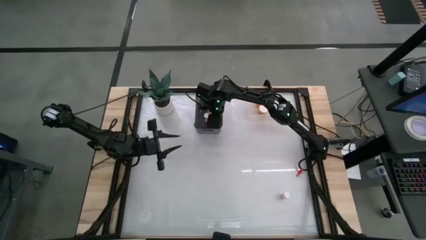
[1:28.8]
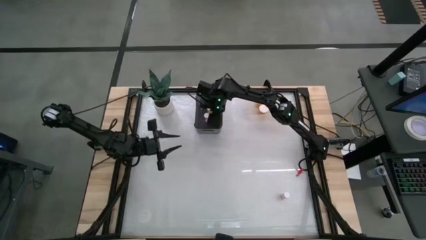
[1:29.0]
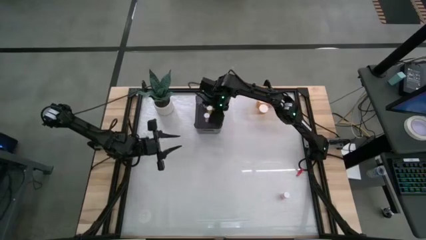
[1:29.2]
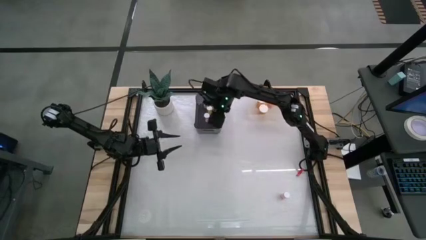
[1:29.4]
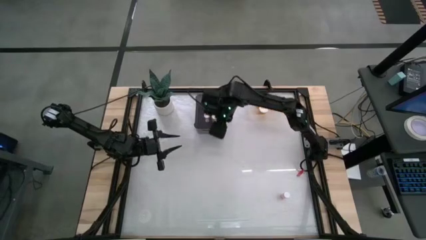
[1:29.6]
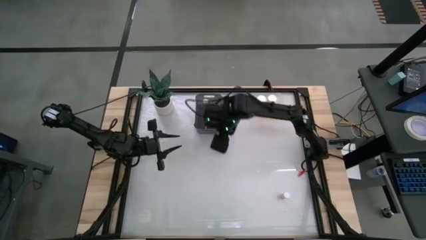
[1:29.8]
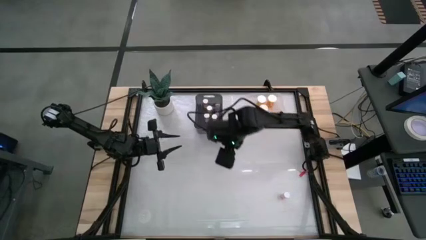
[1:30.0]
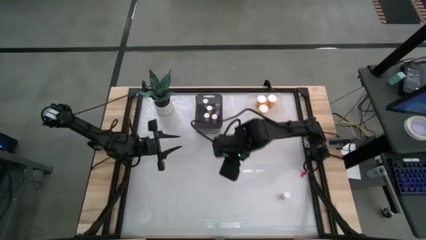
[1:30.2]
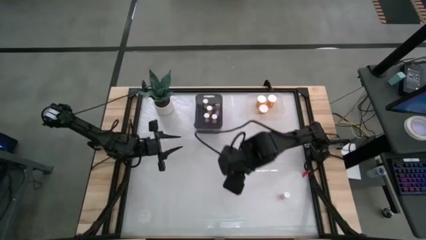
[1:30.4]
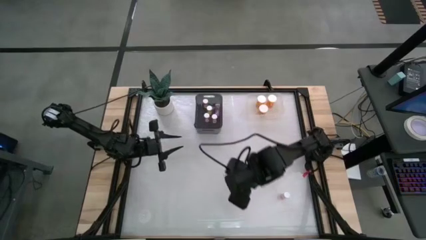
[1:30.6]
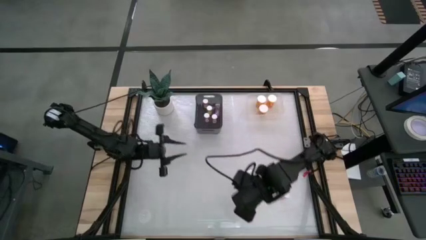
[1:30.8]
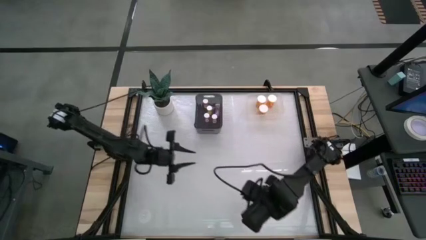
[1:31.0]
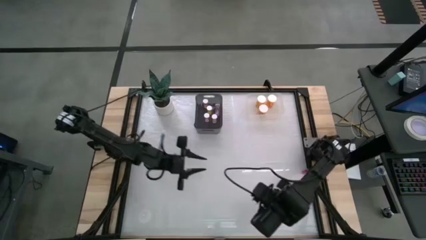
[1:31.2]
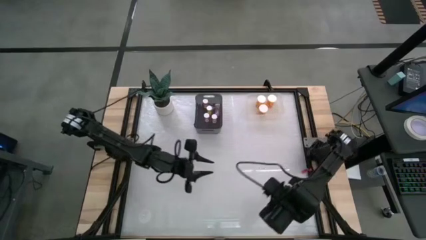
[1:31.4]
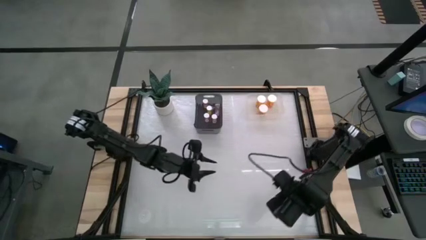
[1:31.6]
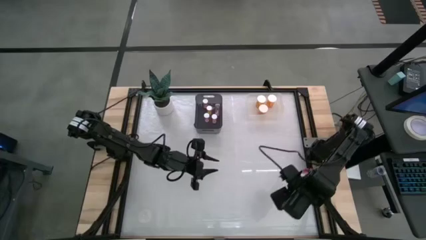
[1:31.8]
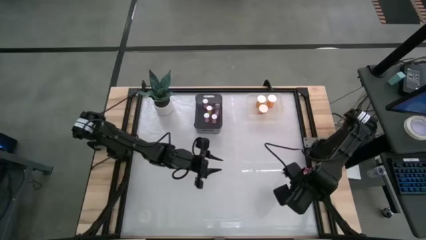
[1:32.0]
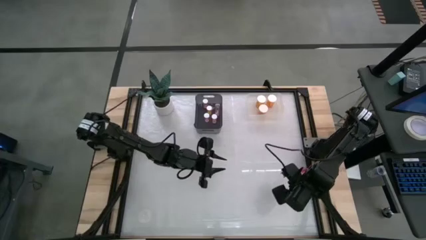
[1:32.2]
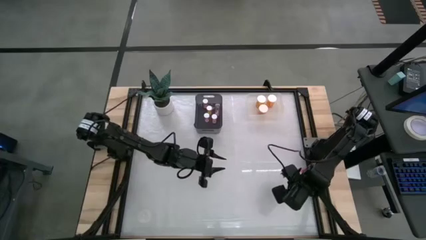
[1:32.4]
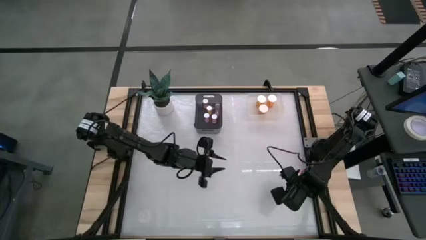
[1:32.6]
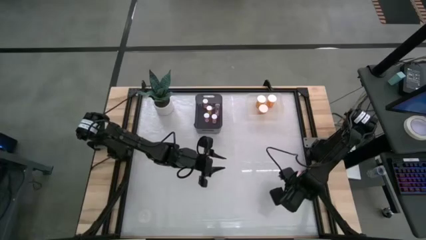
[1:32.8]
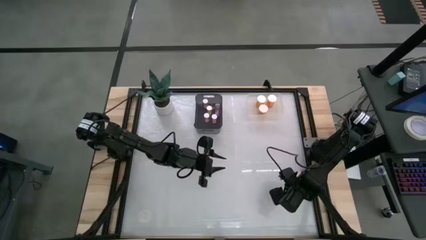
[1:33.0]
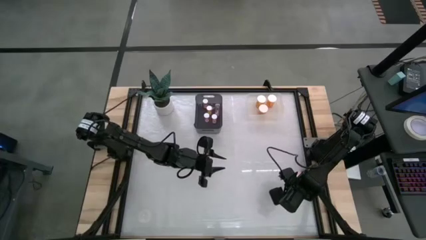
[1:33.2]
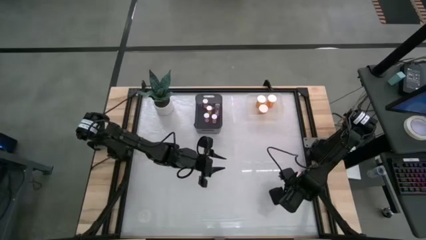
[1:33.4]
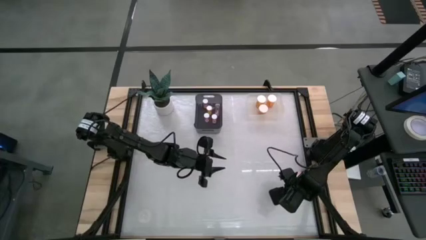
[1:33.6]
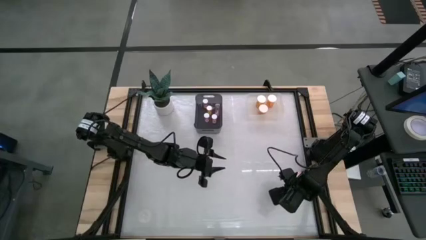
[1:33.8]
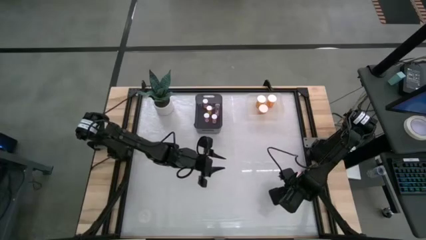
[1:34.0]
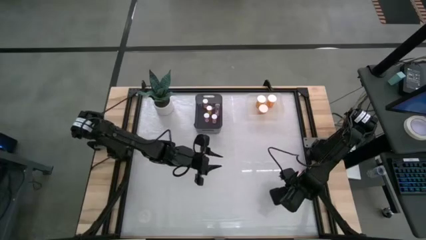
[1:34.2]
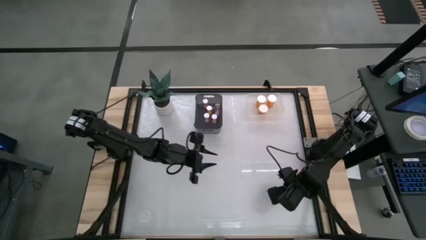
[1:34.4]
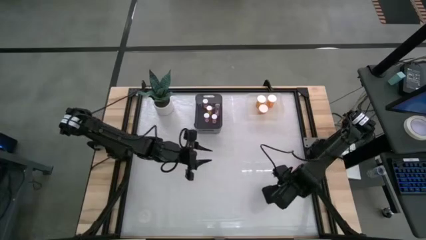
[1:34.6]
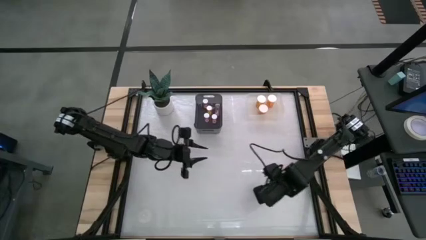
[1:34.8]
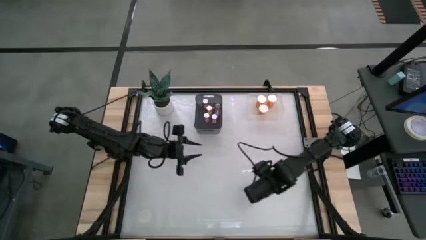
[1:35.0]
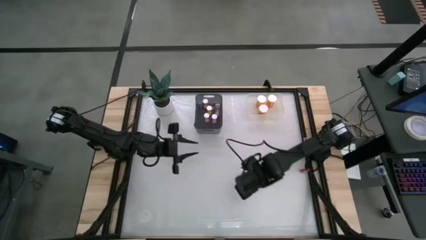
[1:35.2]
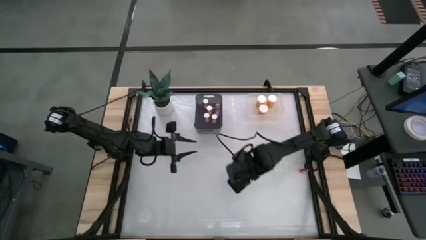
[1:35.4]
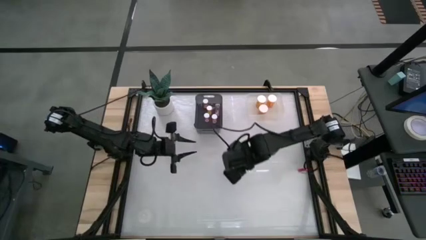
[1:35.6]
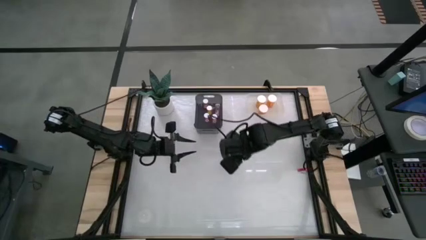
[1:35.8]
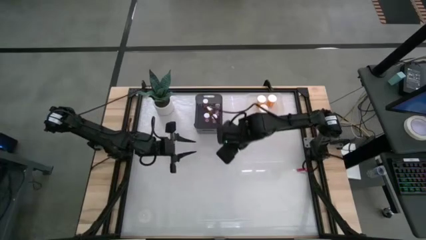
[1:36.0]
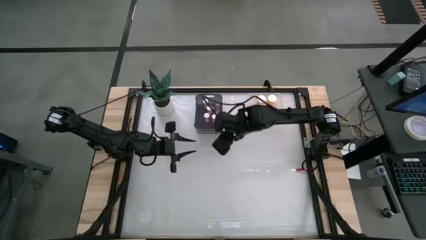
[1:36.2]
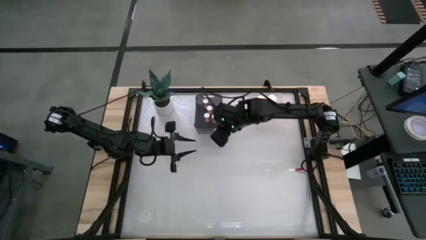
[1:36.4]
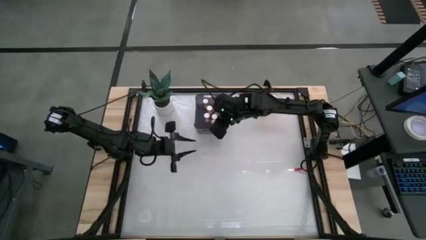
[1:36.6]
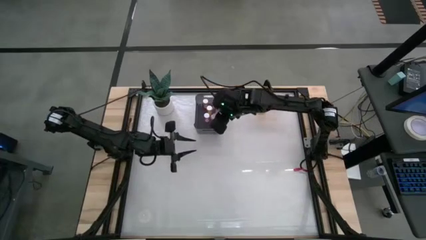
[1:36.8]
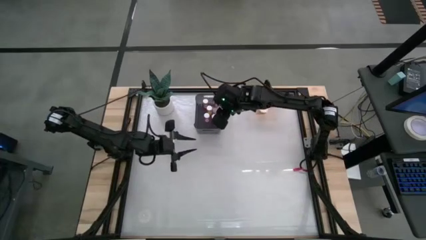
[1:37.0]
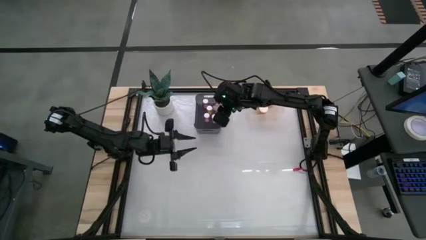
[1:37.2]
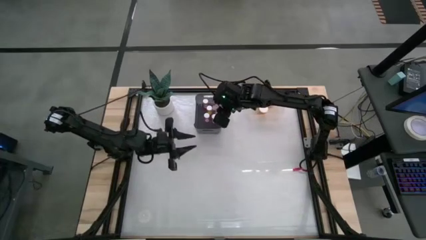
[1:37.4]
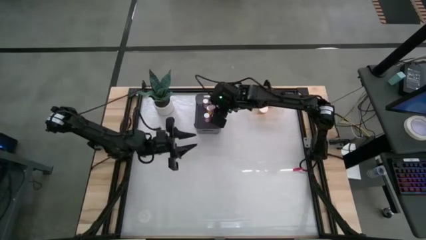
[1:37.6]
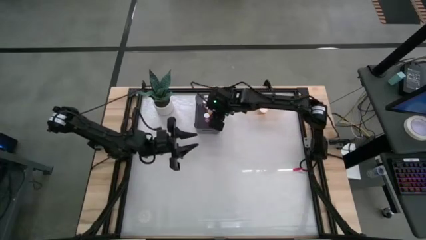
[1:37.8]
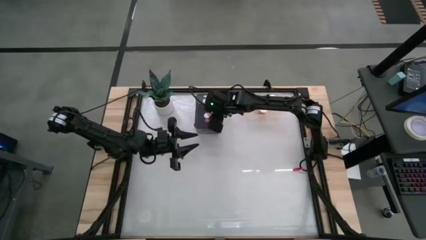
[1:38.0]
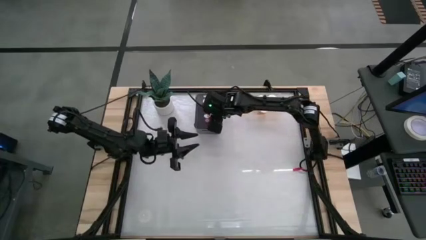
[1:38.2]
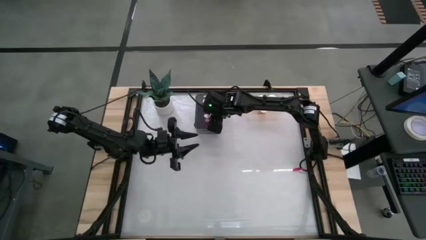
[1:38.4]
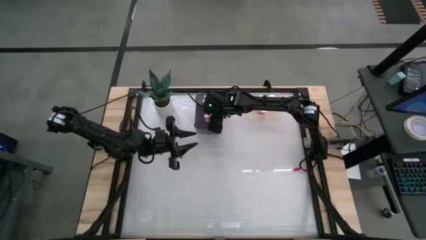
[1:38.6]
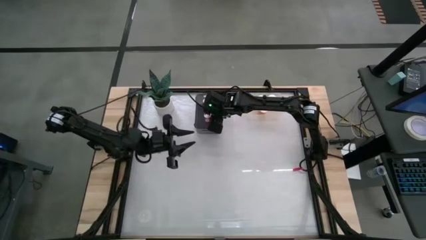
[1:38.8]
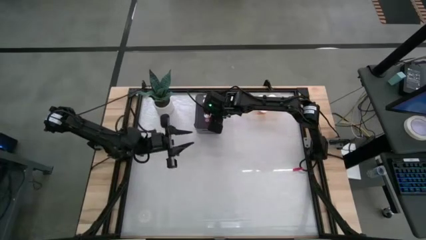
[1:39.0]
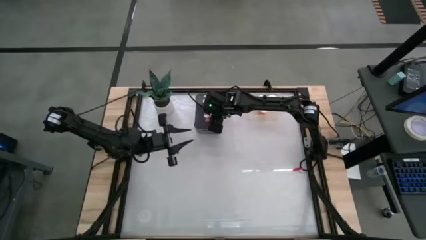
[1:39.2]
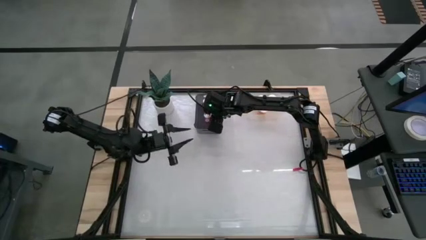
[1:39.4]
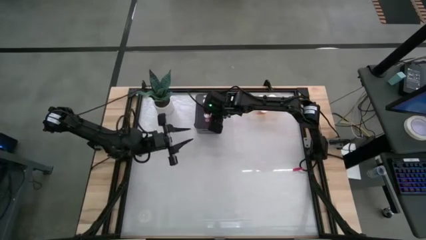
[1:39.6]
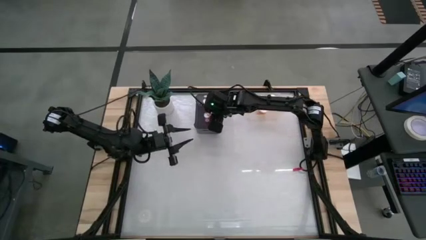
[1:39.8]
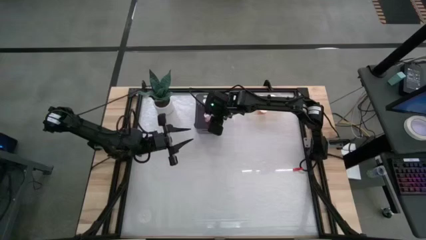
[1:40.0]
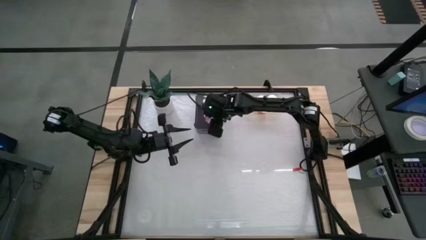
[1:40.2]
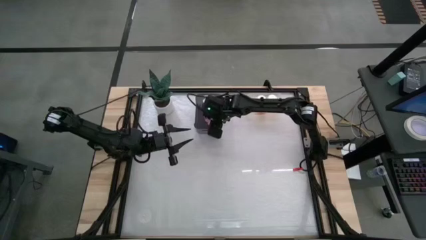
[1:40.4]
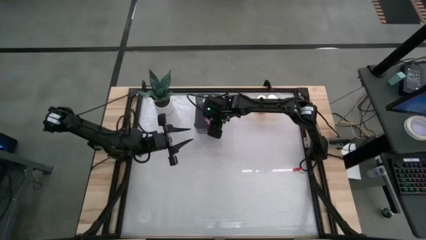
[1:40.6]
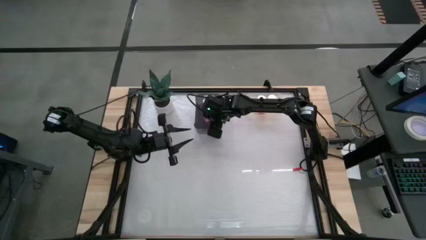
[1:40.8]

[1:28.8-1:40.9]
Task: Pick and place medicine bottles into bin by pill shape (circle, oval)
Put the small pink pill bottle into the black bin
